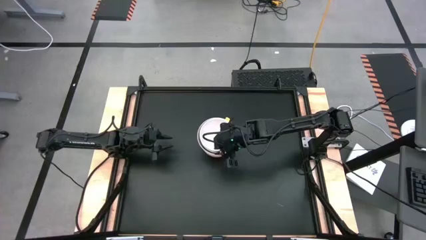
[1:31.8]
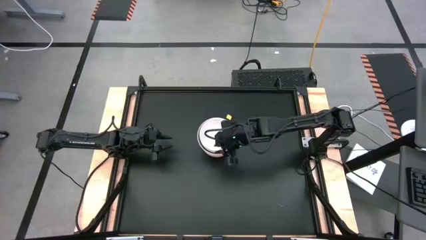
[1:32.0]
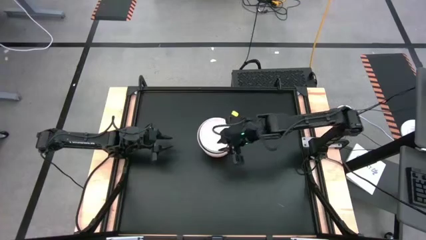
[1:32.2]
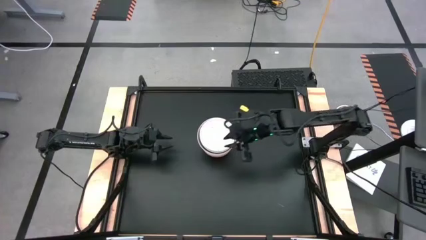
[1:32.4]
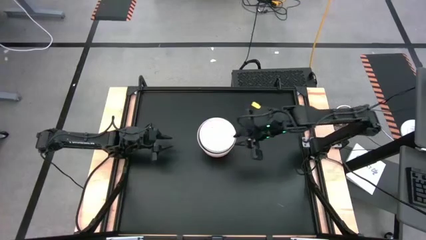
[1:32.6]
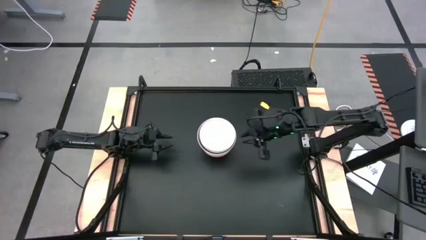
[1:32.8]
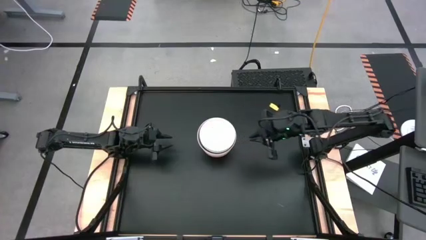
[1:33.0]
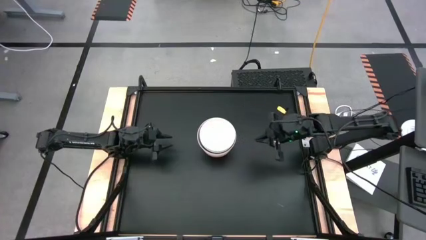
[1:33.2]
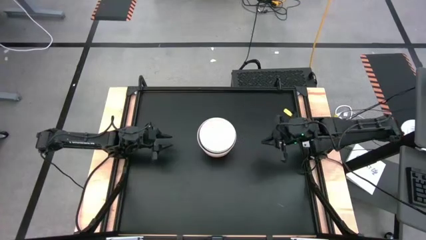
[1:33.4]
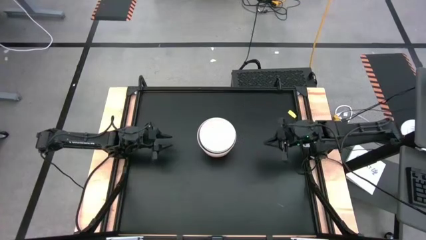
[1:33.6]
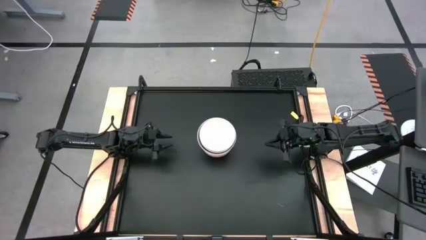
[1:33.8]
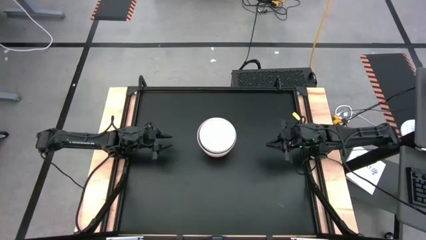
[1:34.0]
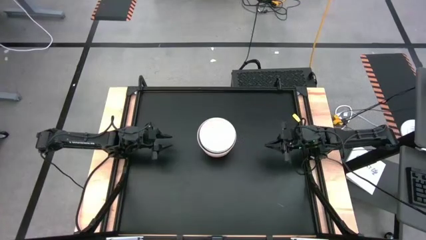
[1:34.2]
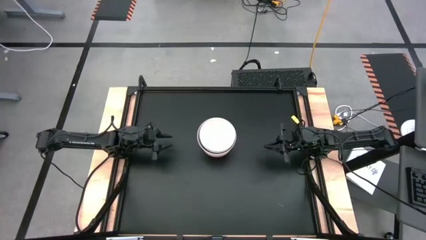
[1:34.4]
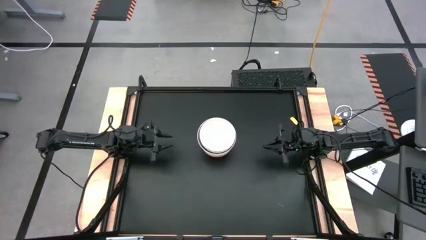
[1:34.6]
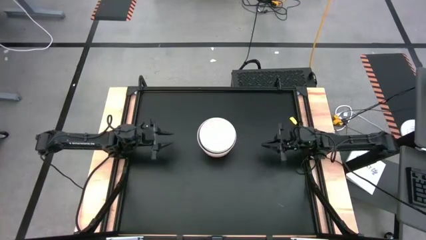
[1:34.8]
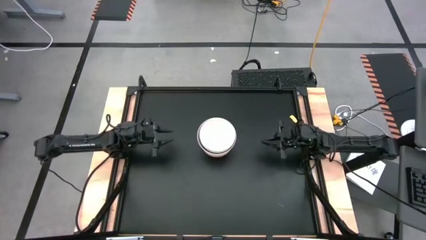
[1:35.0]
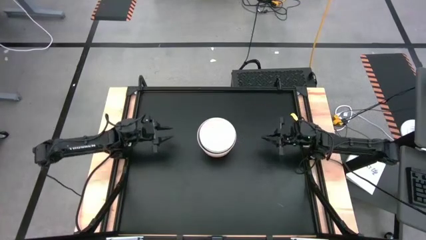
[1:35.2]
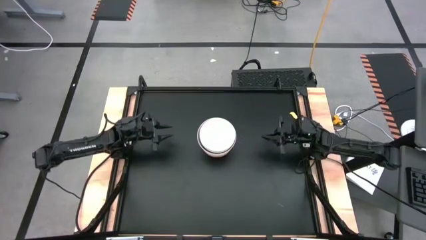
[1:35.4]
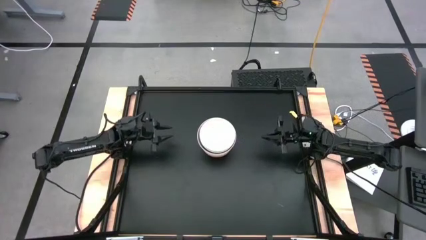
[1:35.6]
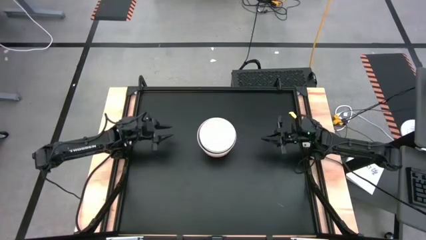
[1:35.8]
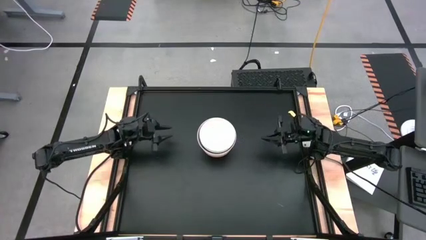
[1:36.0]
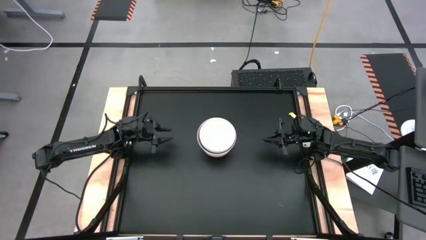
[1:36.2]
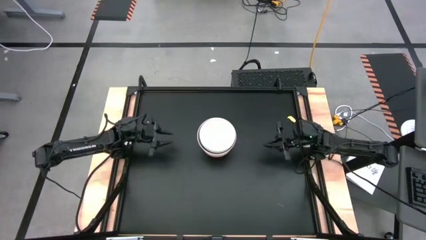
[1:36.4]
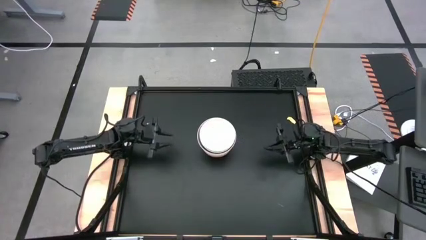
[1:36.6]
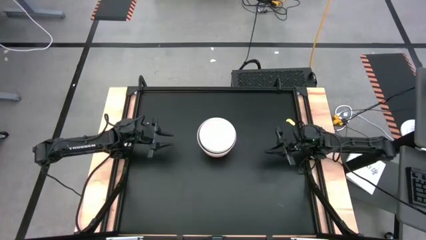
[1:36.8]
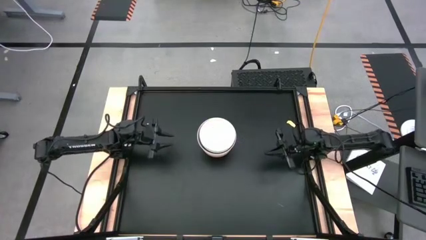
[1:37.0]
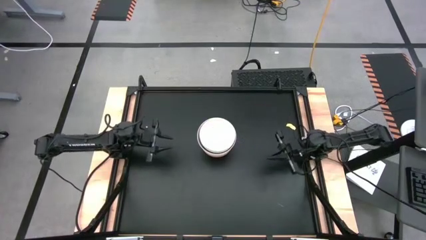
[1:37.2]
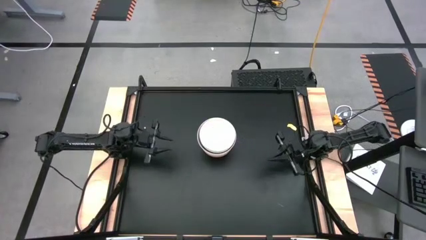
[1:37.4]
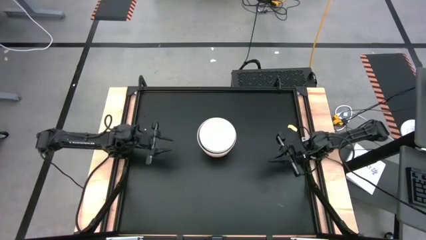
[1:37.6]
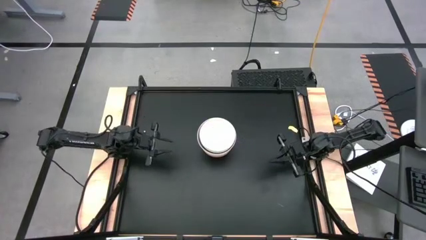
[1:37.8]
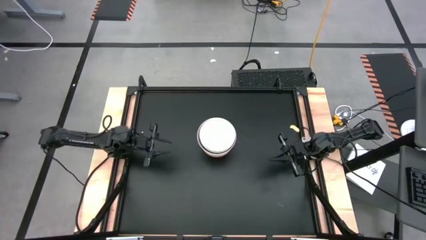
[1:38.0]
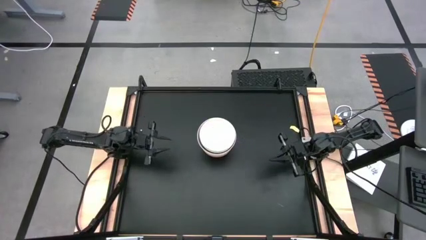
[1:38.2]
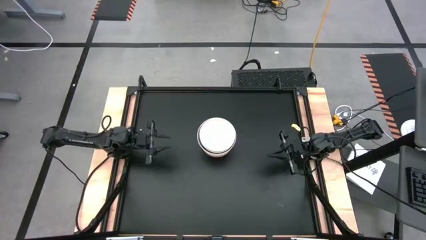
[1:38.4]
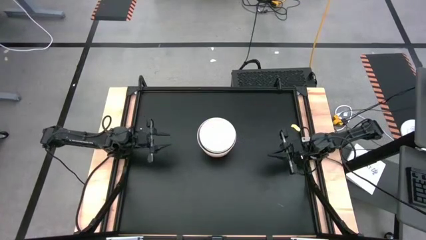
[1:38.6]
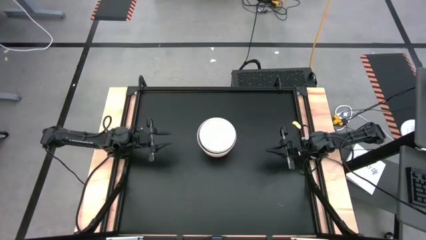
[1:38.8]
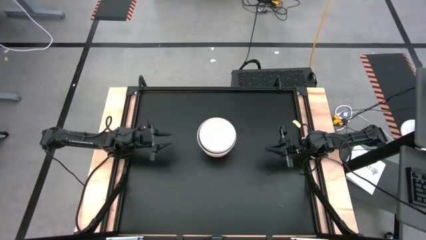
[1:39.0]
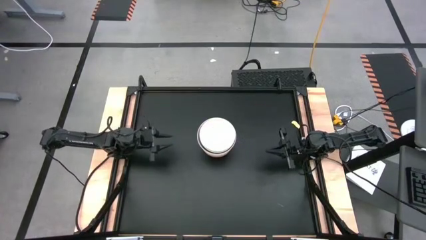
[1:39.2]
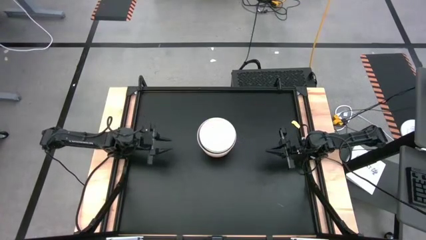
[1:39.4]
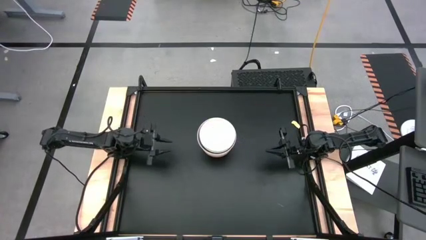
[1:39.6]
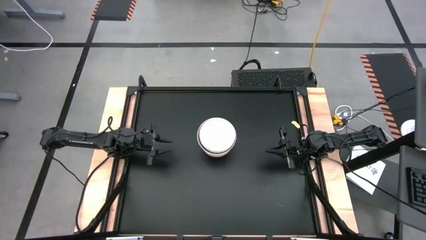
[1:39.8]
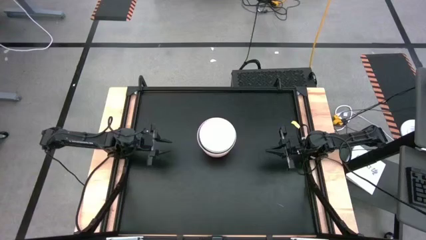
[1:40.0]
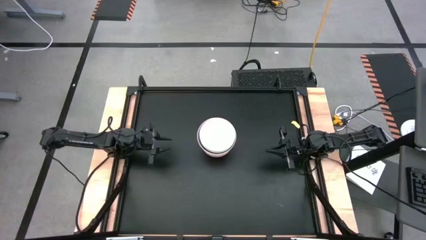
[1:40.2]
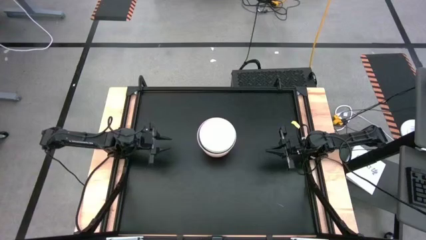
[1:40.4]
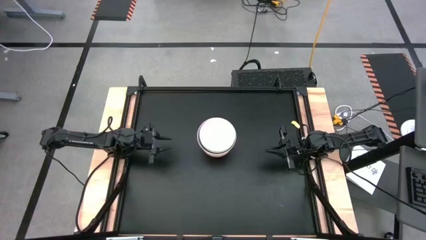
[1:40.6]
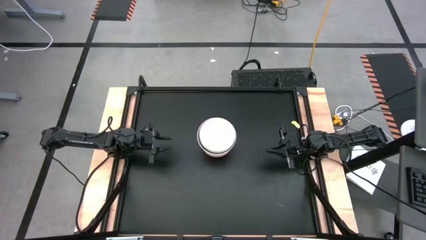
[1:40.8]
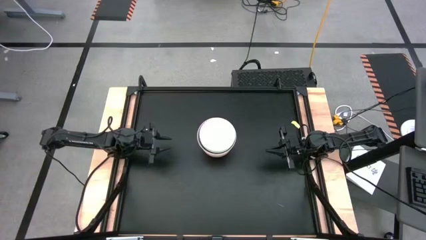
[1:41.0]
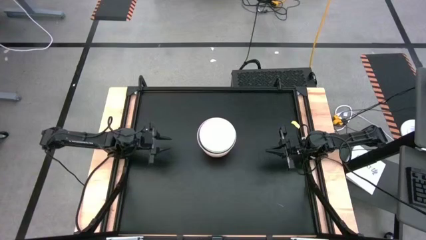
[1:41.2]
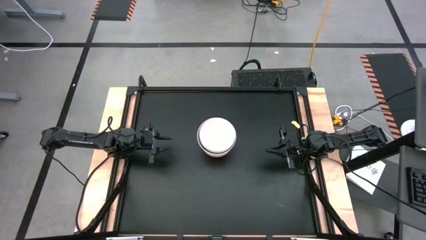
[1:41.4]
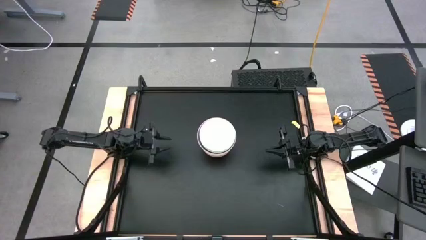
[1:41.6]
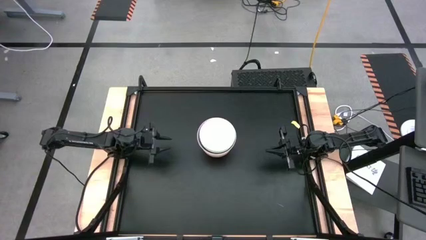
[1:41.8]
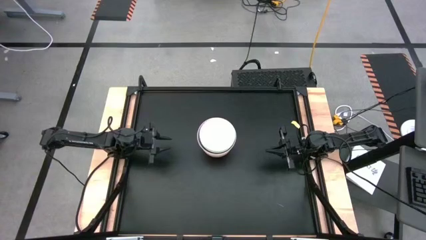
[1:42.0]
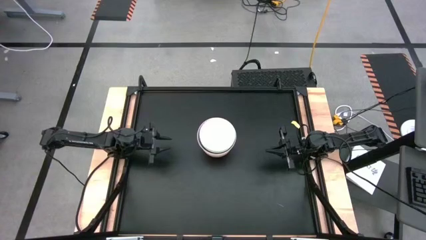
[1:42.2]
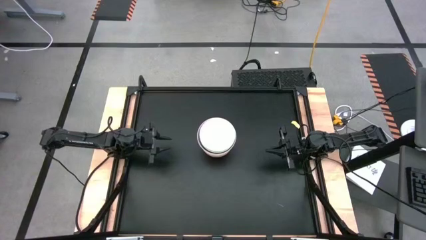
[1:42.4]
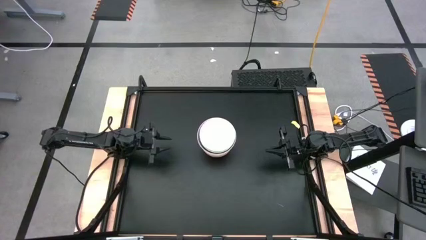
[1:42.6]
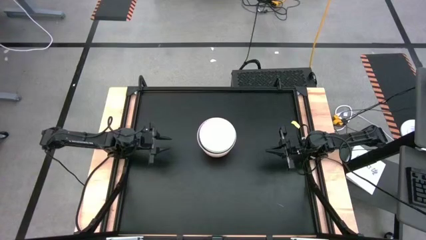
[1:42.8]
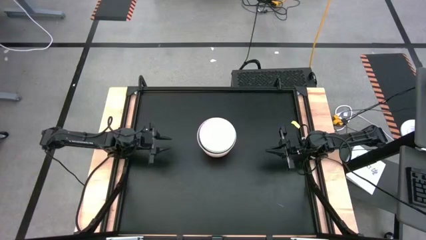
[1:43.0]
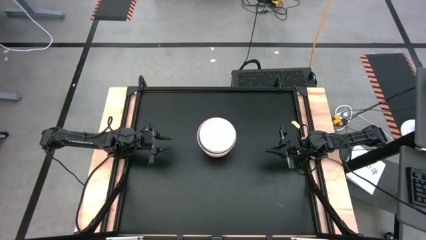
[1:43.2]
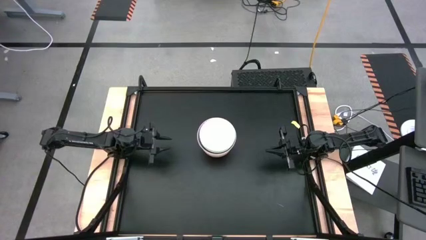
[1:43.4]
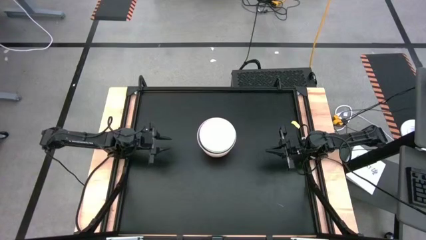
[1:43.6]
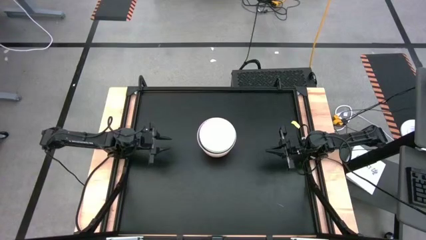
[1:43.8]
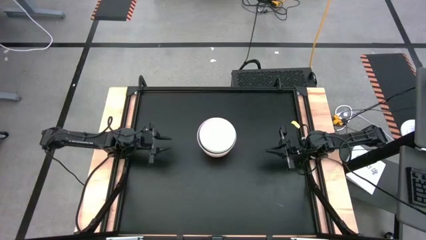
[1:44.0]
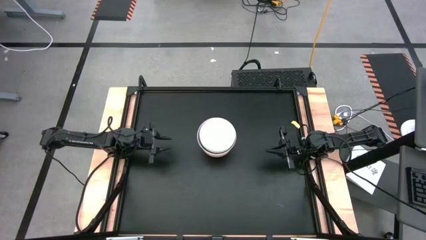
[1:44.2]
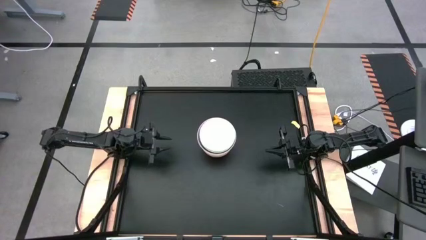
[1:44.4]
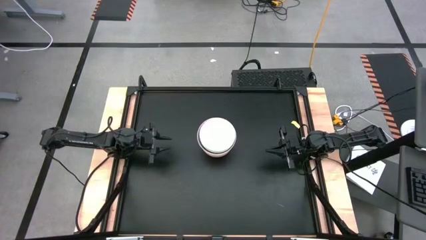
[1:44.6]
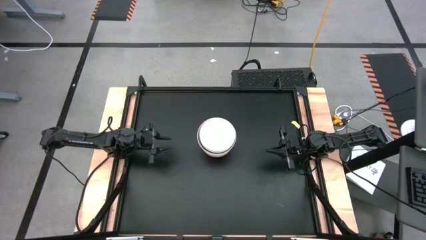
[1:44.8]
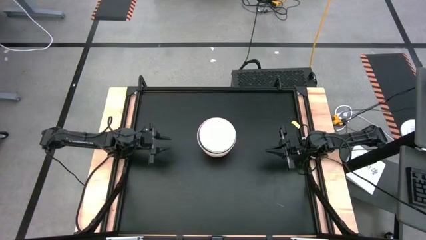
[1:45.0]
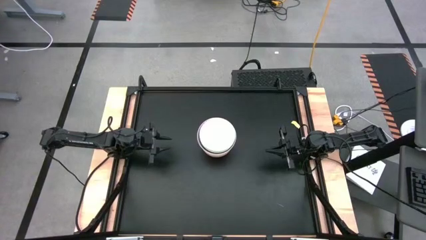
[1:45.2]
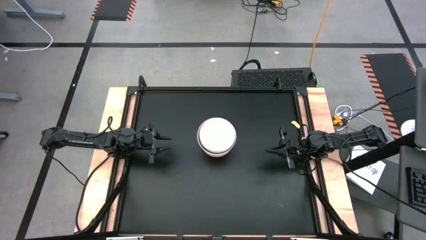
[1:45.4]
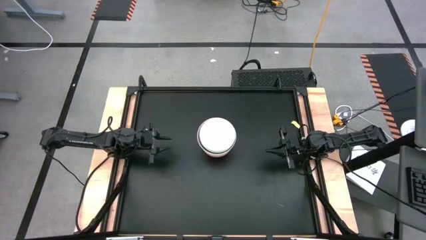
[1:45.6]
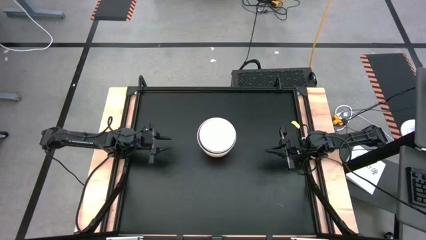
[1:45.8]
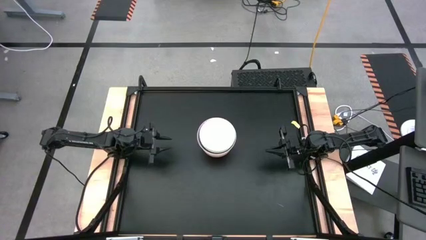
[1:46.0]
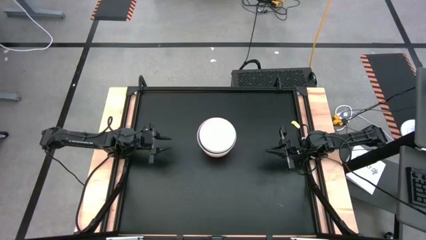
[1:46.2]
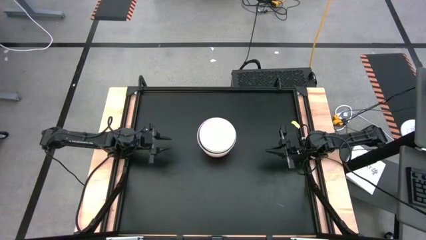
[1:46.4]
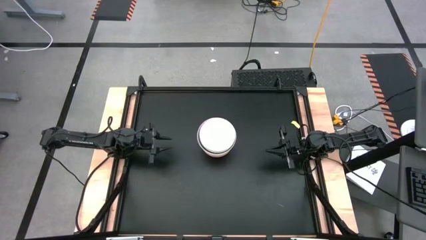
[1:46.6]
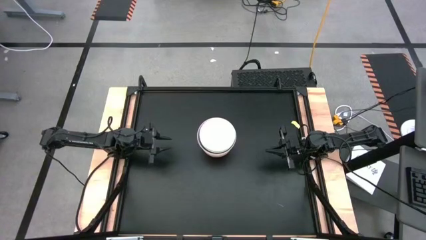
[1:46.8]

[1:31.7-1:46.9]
Task: Nest bowls inside each other
Return to Home Position
